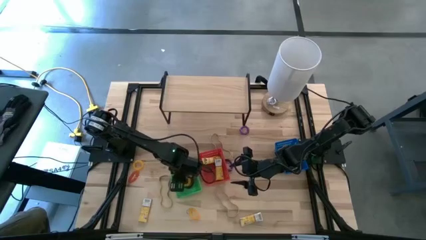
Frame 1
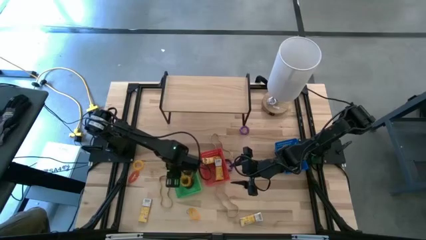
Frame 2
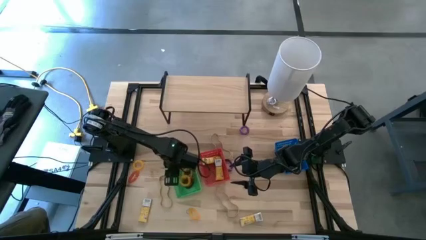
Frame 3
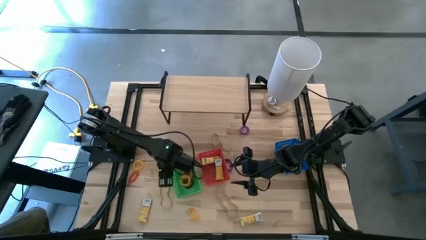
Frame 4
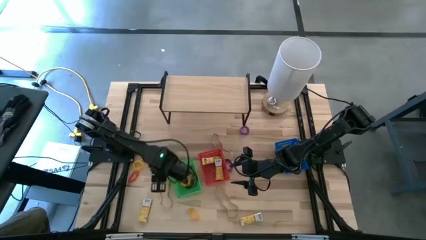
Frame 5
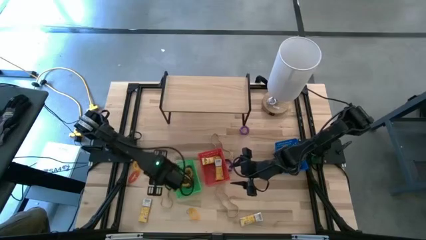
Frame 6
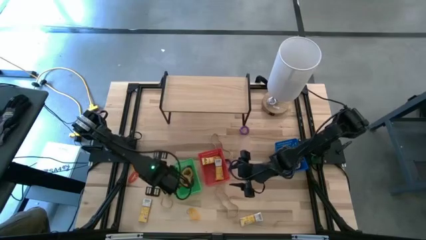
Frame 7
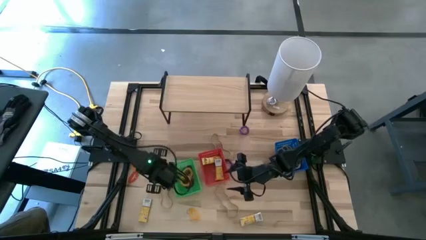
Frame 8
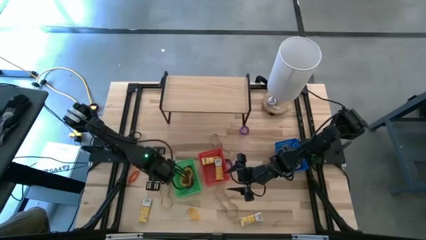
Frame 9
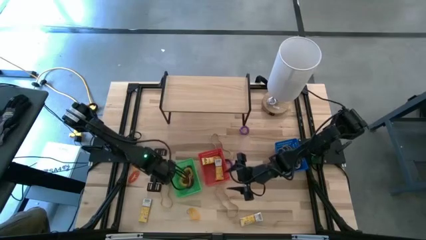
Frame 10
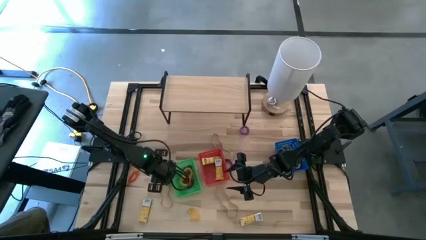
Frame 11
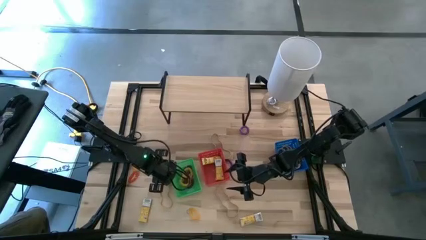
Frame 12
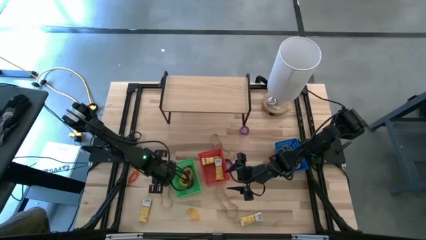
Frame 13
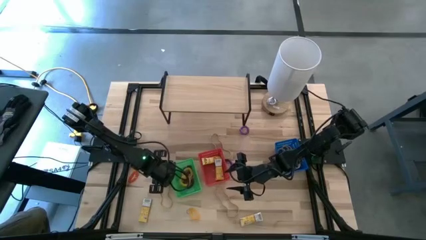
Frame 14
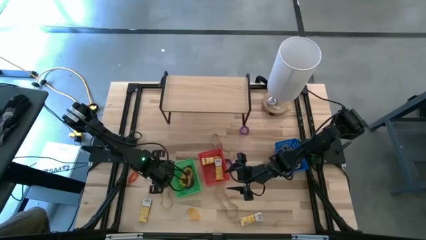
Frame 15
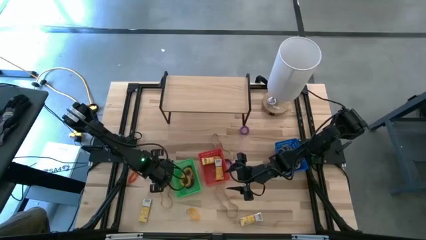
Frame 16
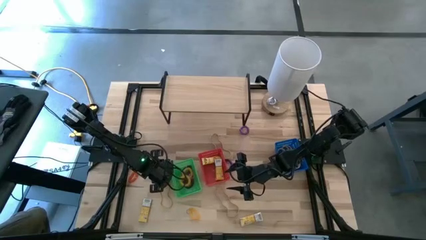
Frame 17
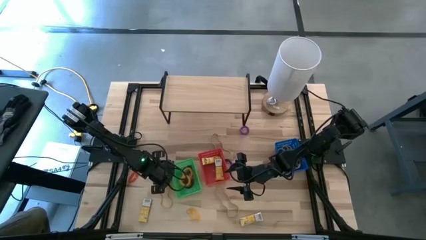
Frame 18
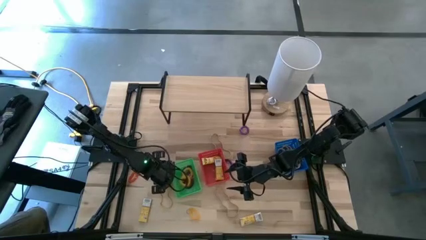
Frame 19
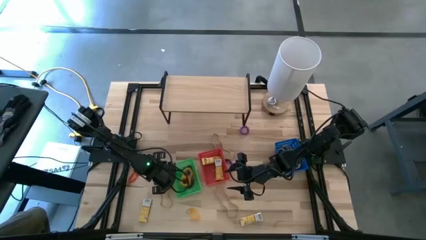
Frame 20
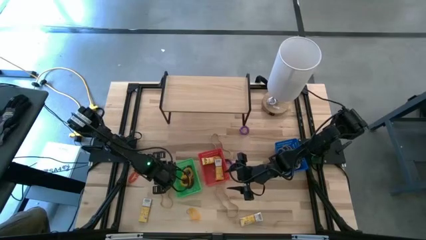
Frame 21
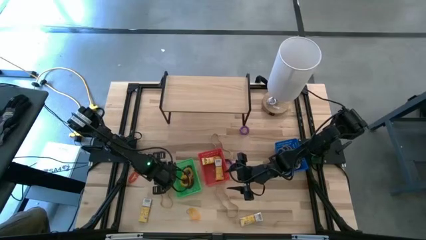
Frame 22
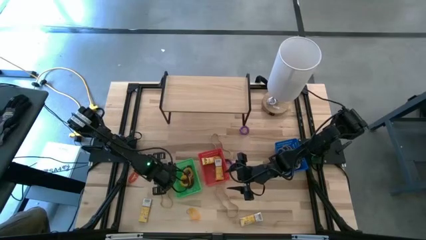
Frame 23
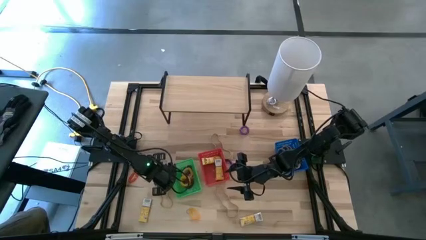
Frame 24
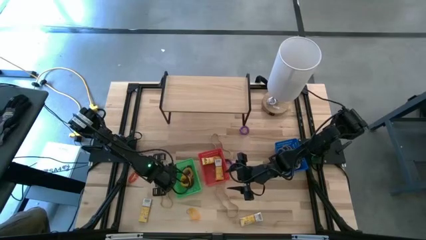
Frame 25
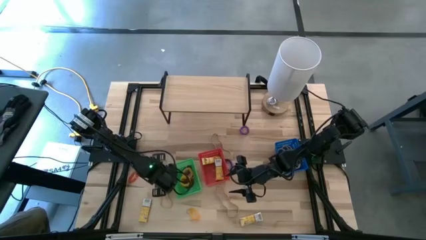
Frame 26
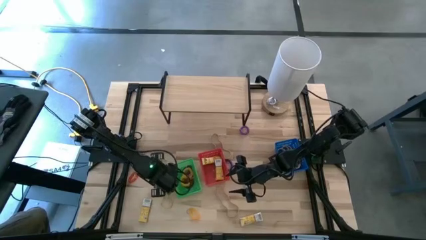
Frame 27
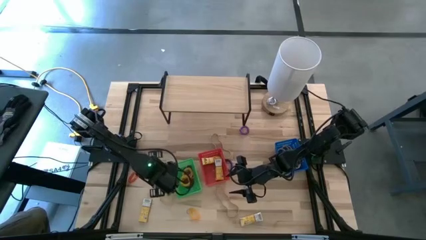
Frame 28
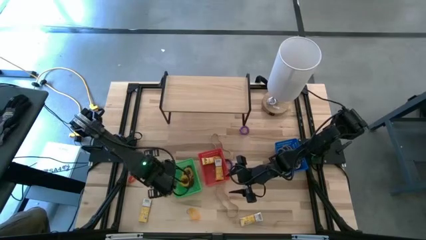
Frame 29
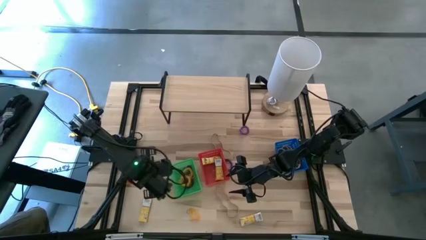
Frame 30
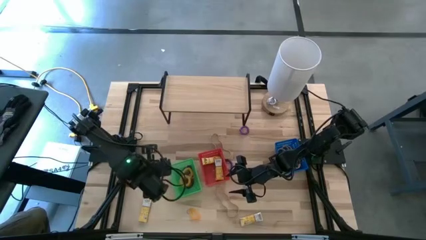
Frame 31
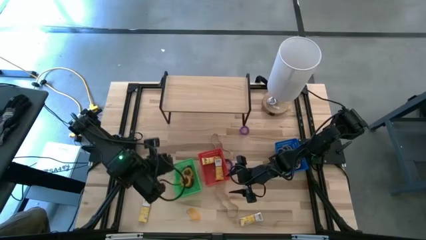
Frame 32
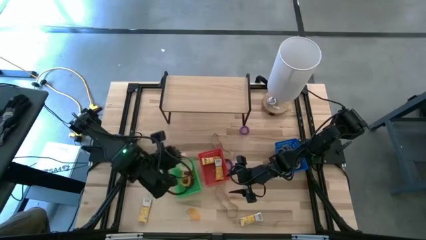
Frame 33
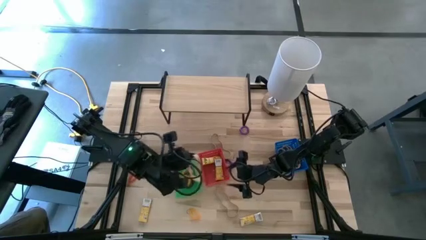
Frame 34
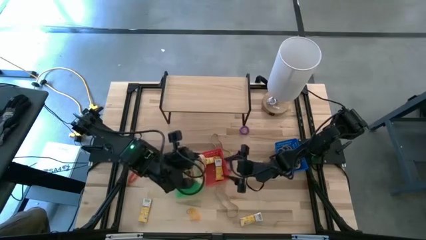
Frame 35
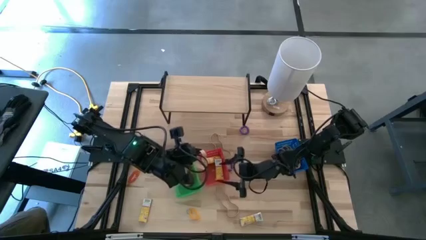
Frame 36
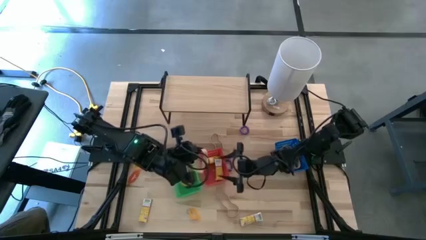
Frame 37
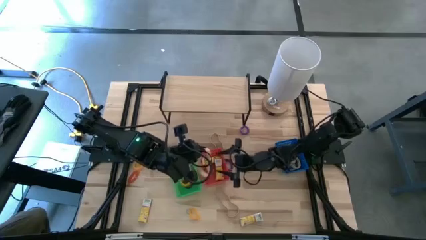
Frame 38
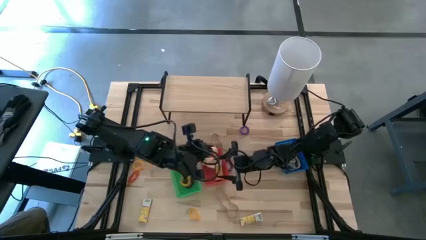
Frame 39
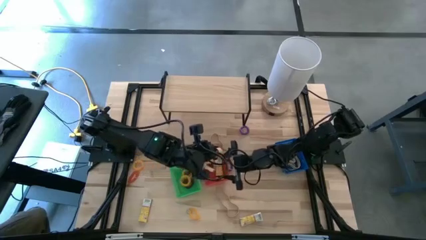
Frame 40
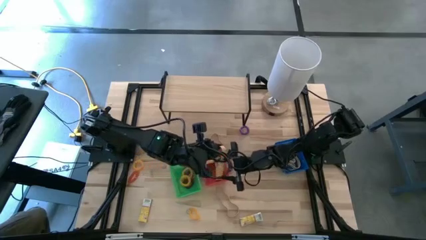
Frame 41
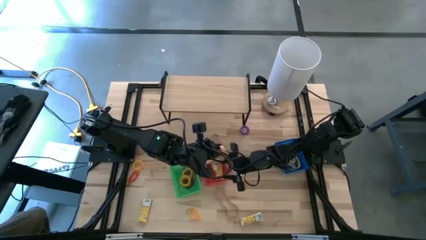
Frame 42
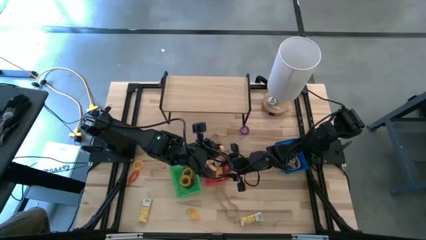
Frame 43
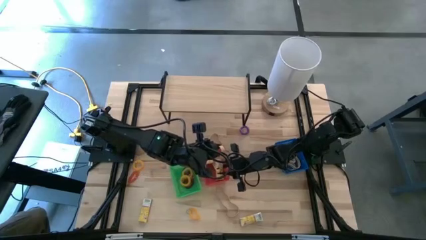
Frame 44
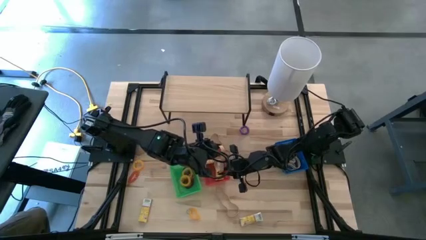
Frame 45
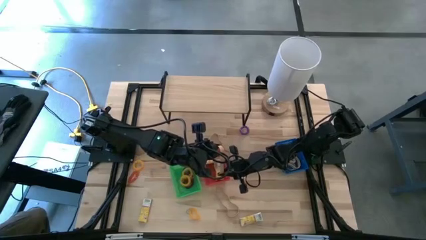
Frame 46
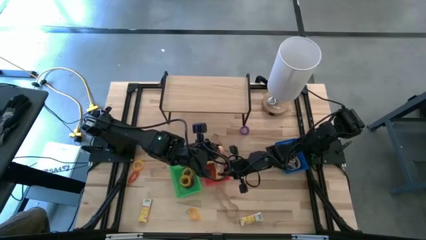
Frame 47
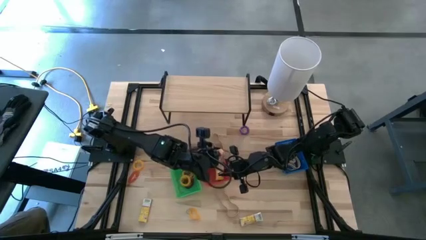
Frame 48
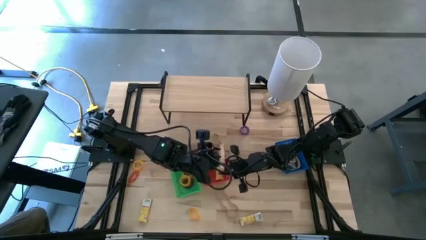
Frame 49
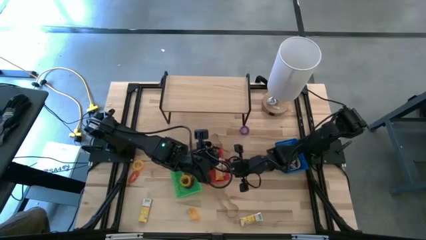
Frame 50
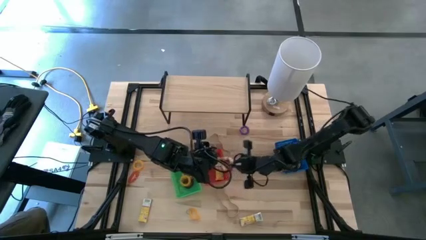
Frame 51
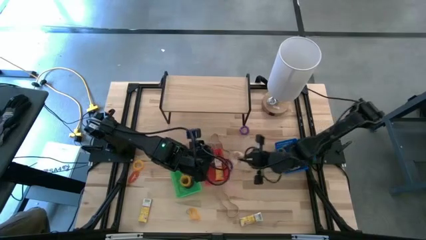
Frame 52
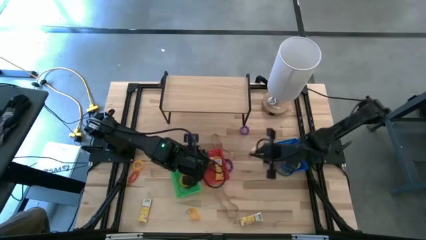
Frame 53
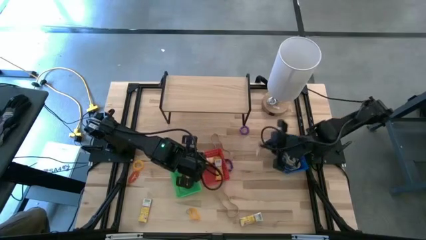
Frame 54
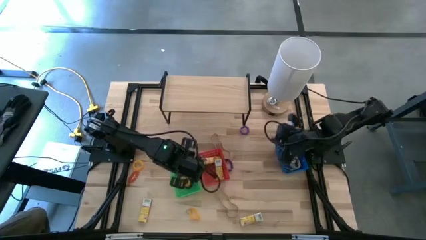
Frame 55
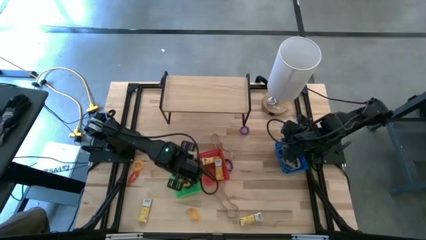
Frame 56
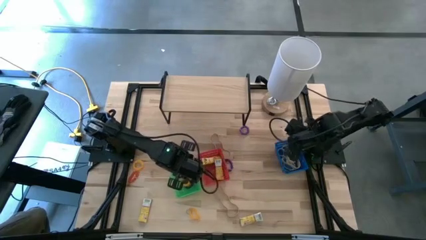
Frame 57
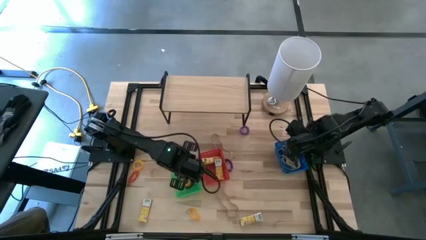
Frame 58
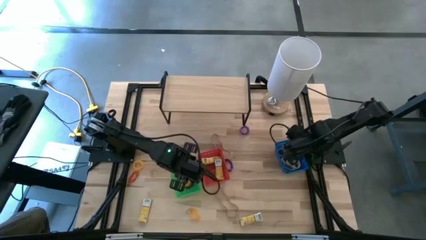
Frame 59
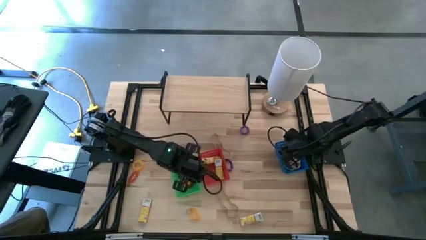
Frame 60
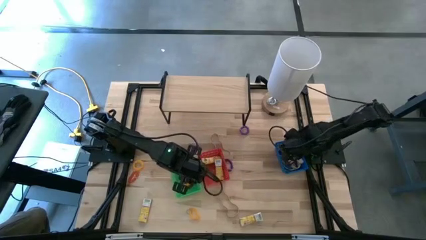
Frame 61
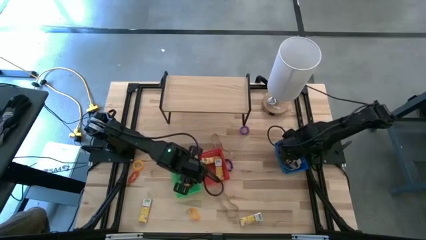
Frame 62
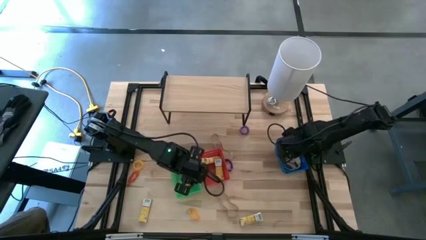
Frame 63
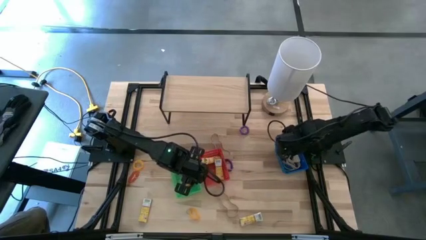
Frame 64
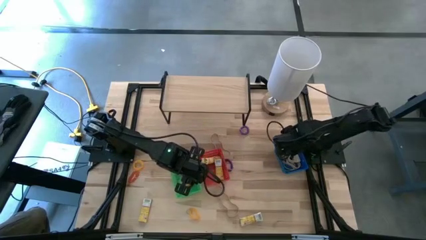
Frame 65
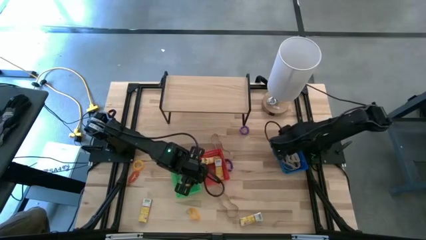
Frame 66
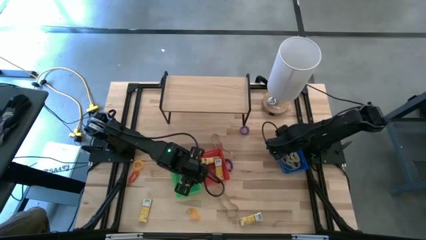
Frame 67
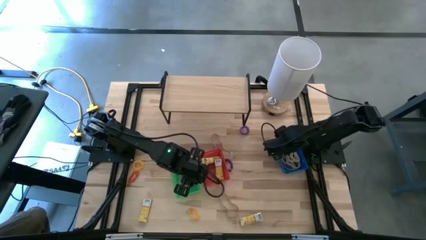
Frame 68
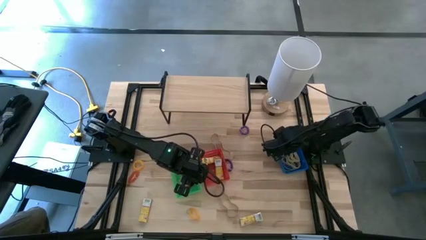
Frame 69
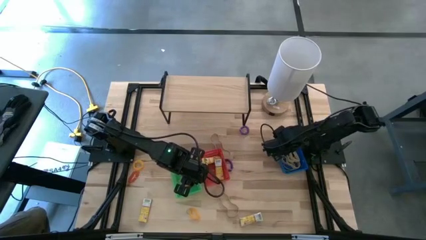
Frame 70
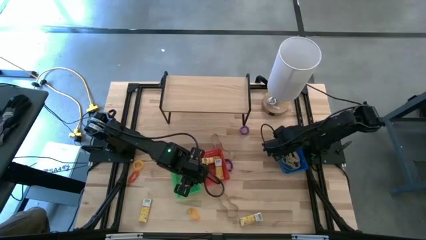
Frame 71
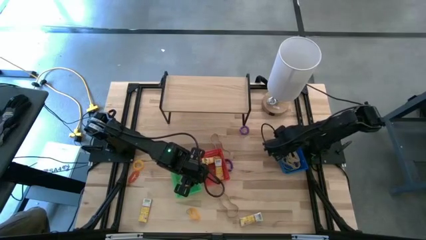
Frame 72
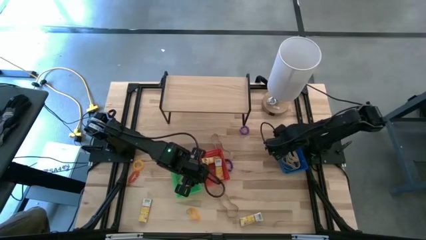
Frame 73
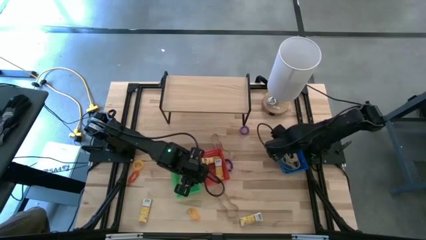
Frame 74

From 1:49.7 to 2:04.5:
Task: Pick & Place Office Desk Supplies
Put the white rubber band into the blue bin
